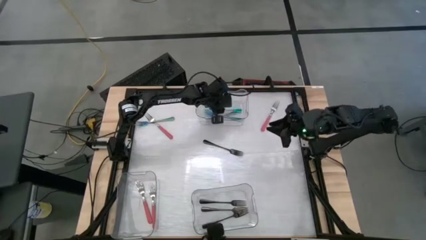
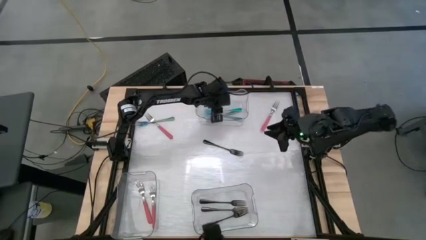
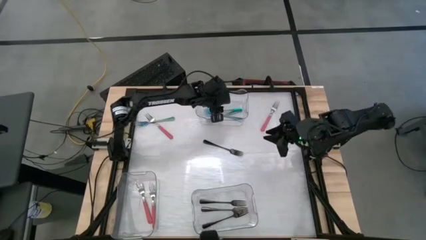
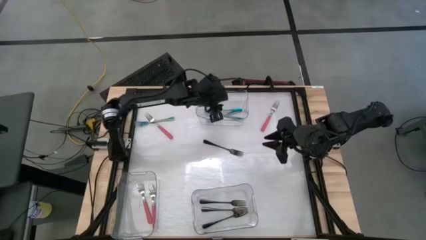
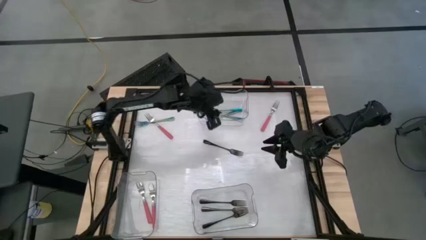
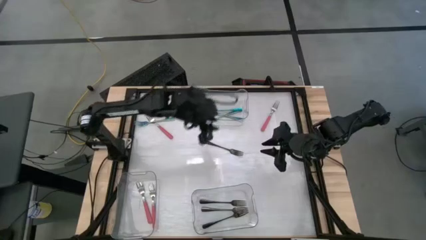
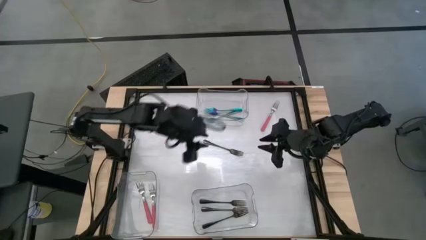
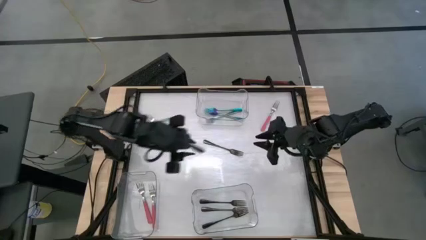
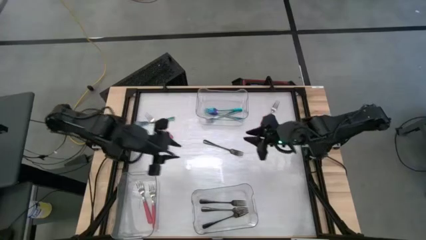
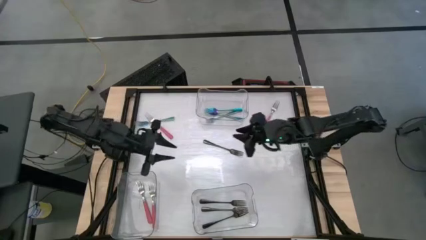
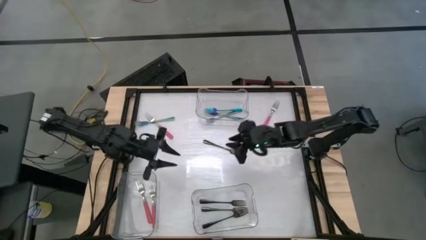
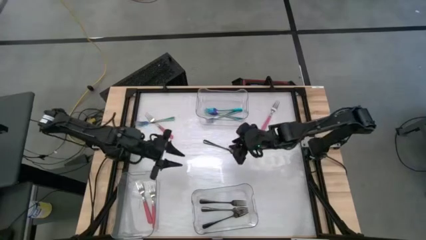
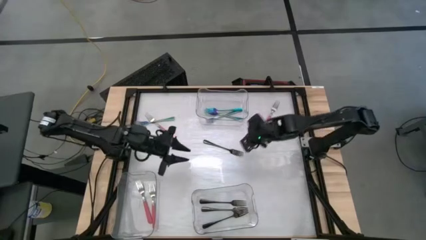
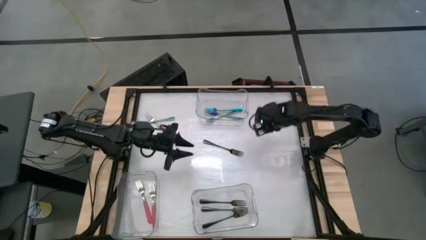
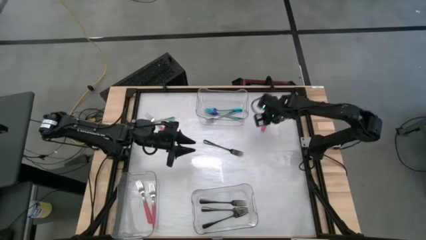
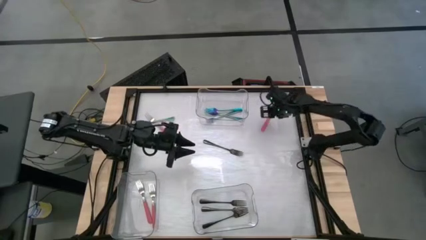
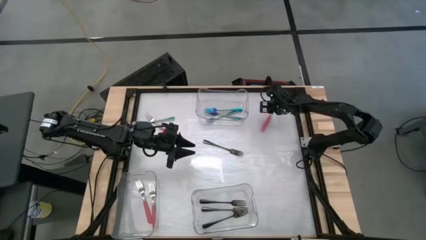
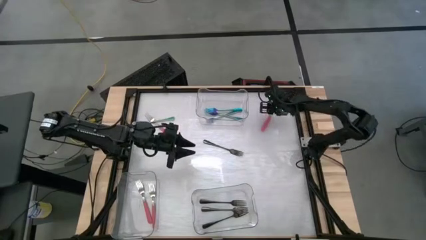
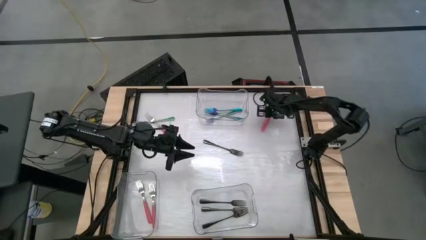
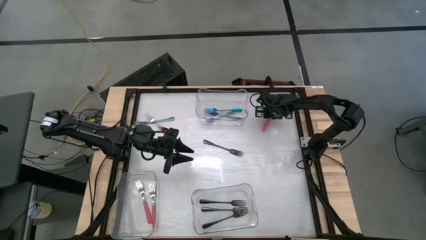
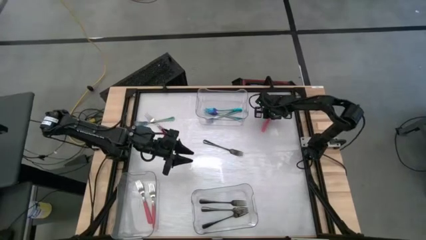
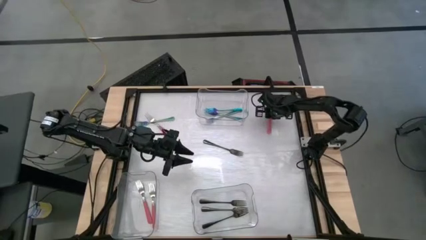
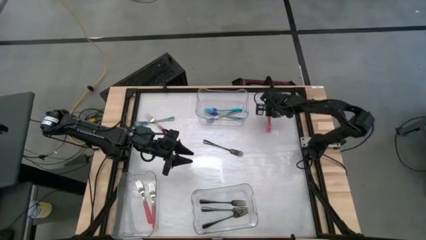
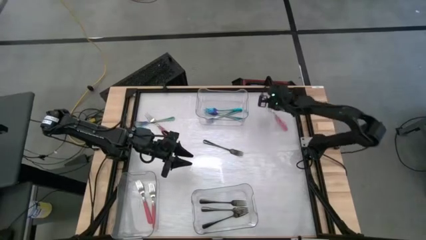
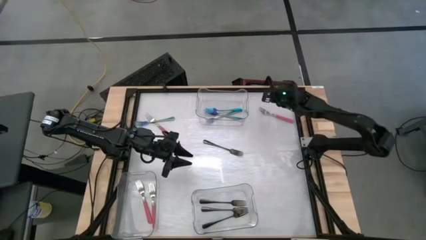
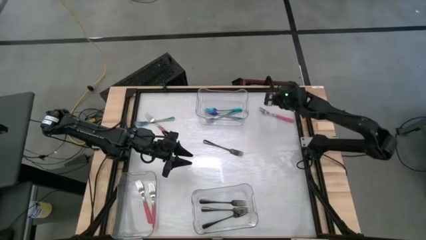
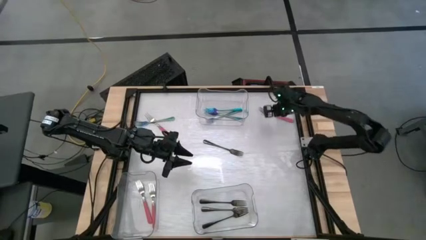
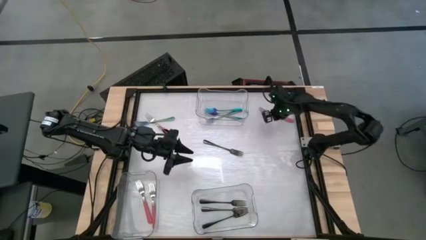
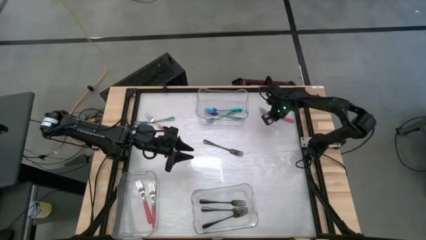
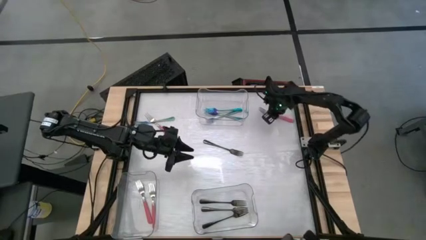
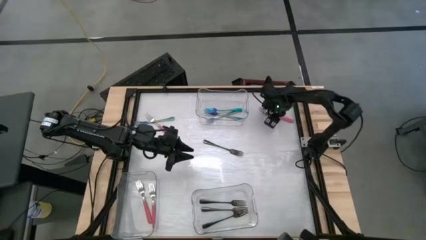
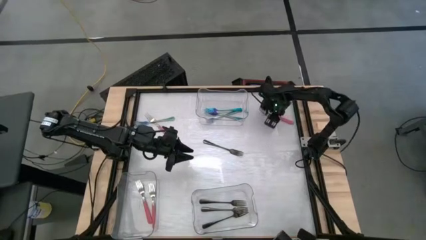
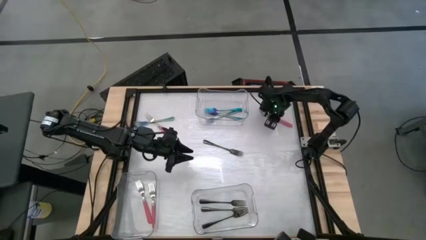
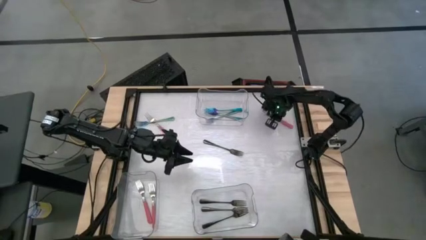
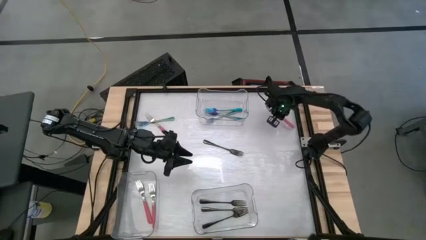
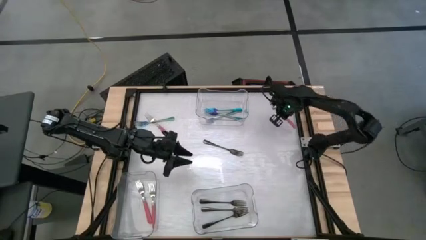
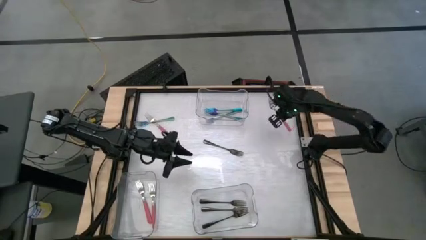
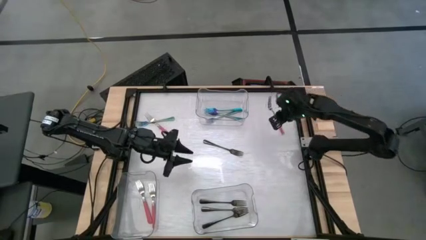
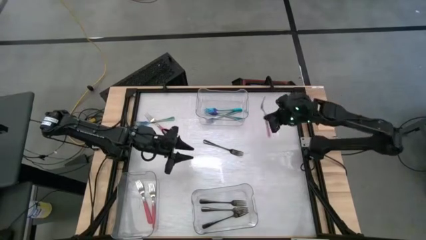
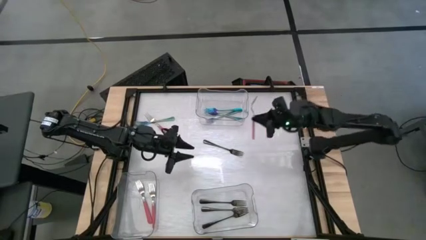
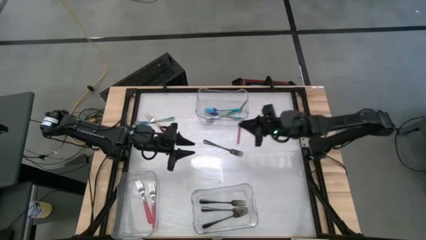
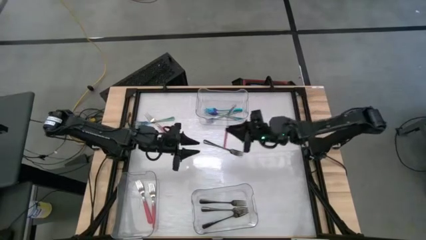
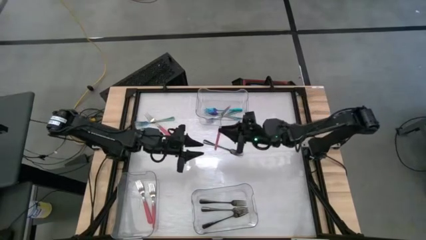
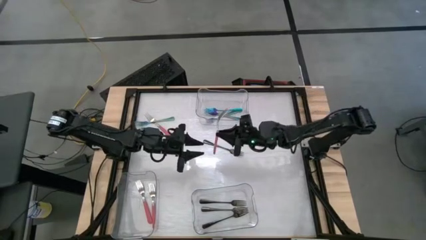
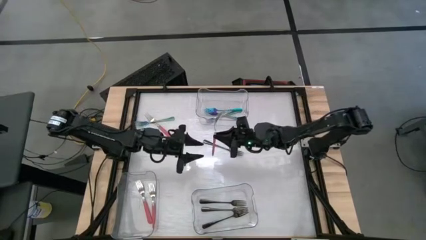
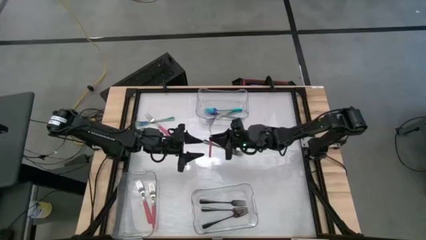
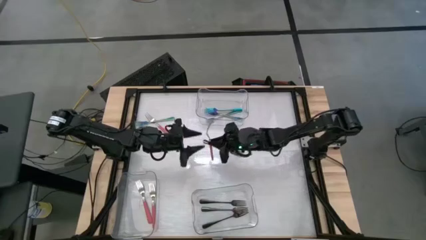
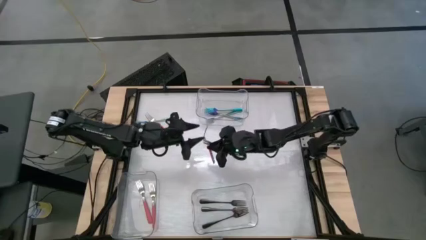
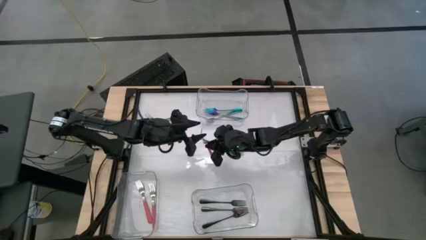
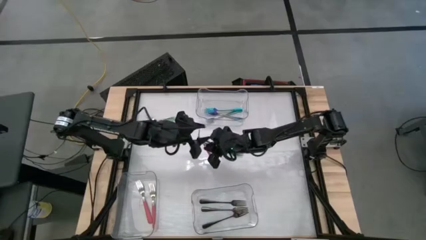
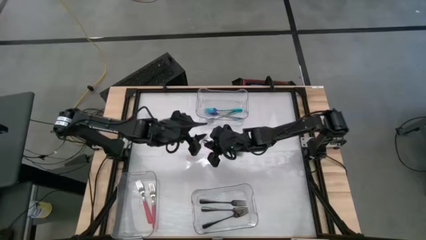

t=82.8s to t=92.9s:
Task: Sort silverware by color (type)
Put the pink fork into the bottom left transparent bin

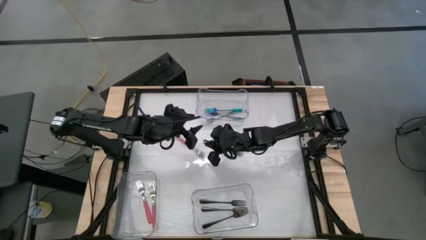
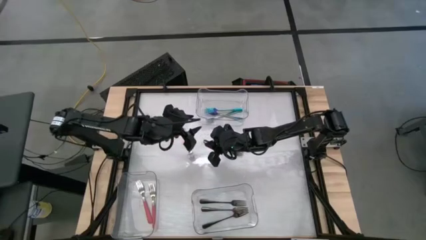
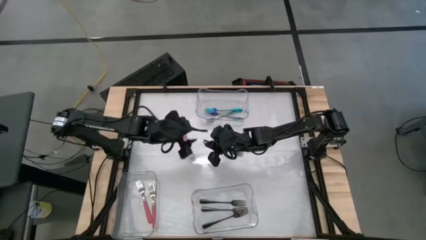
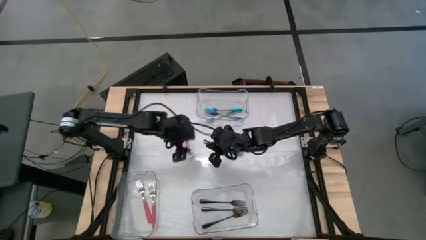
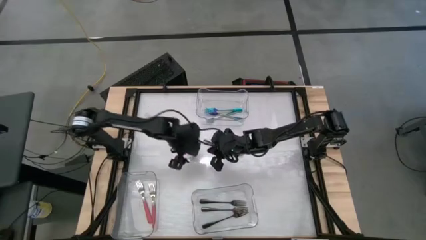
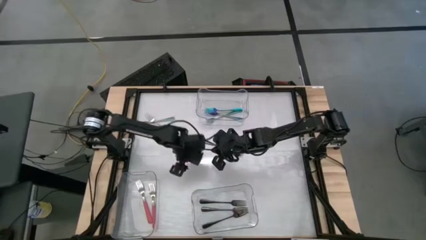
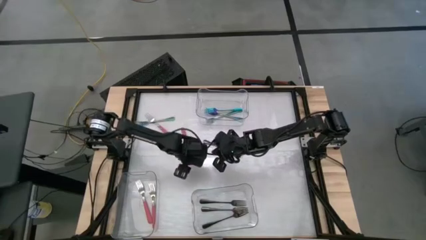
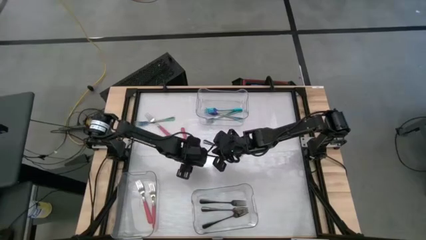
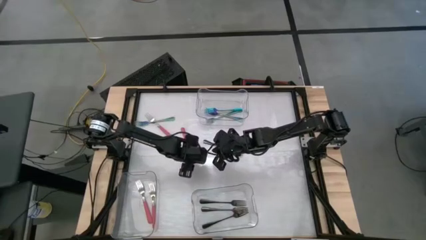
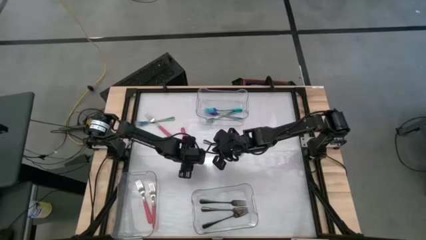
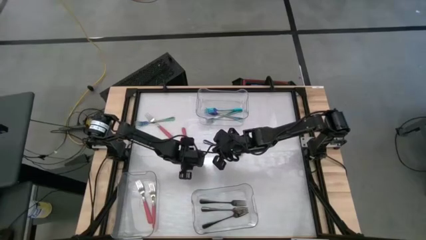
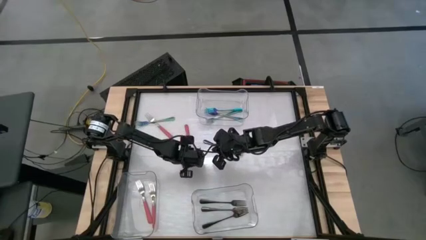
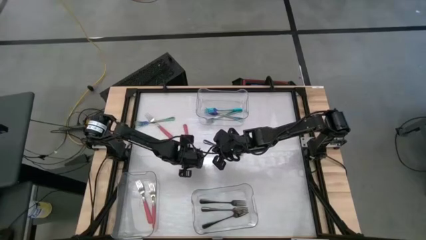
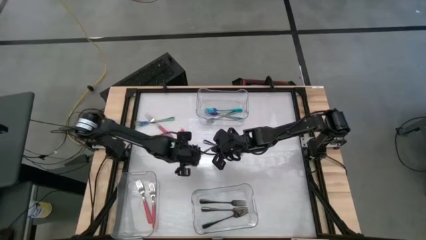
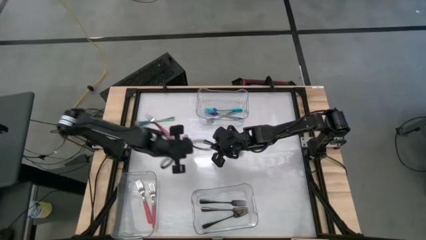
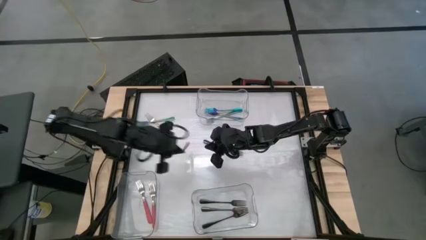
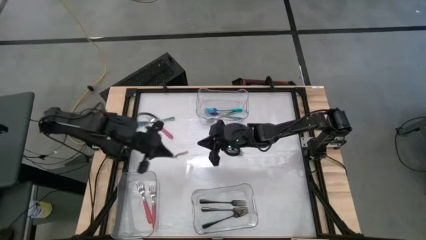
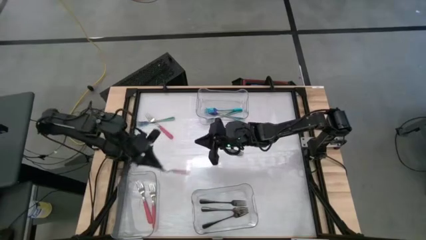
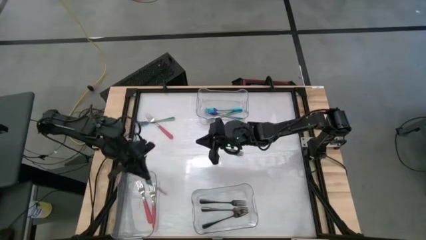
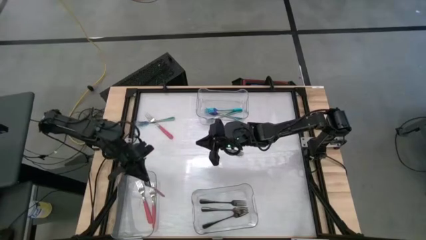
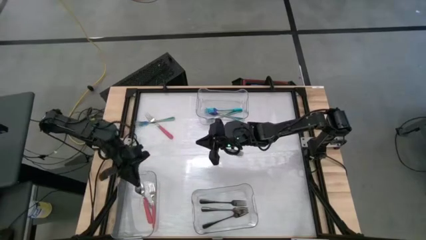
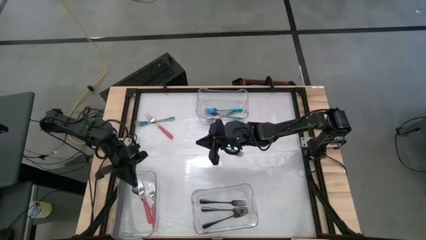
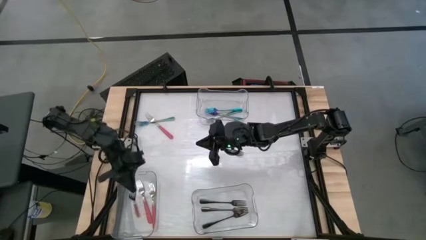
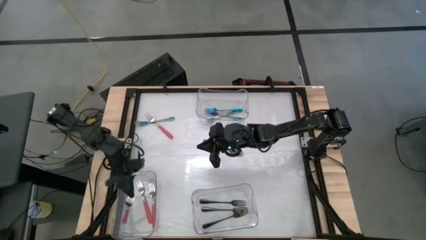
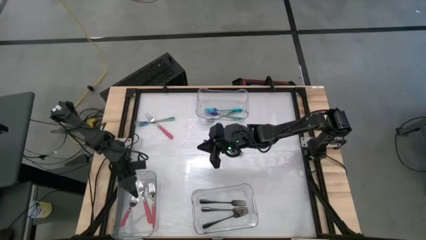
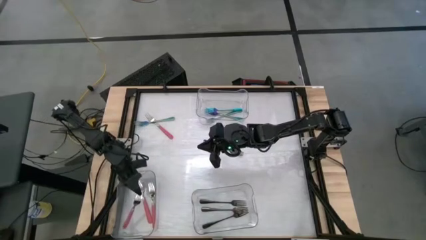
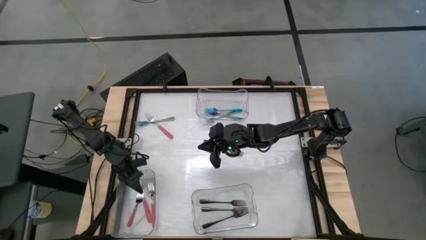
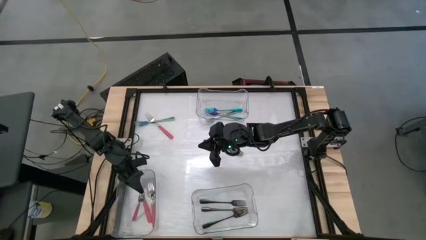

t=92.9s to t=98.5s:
Put the pink fork into the bottom left transparent bin

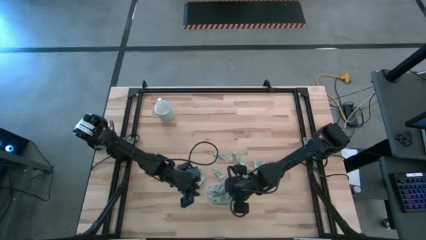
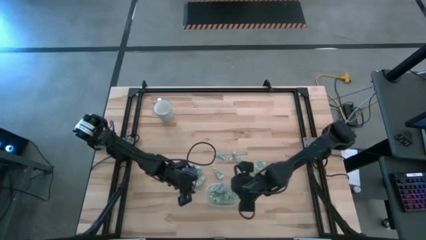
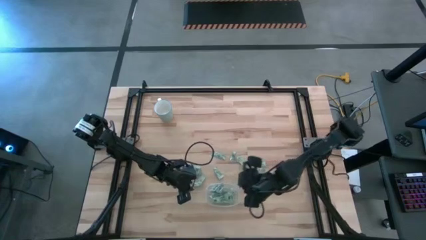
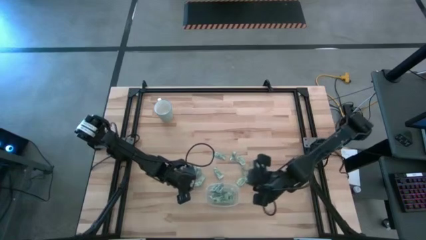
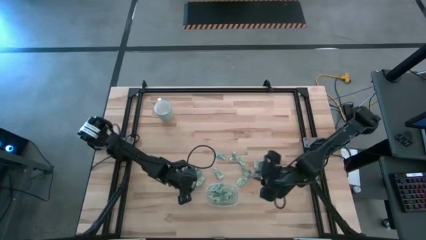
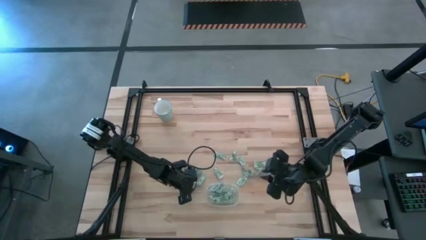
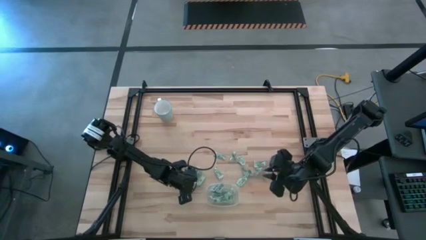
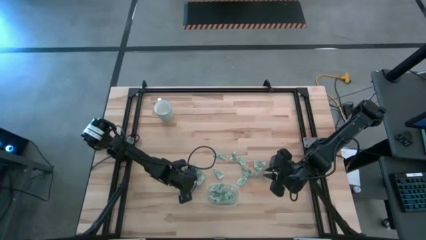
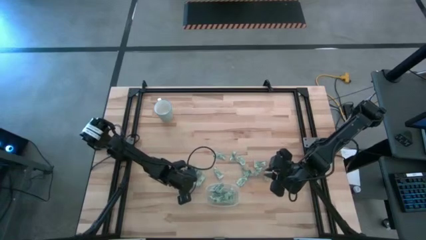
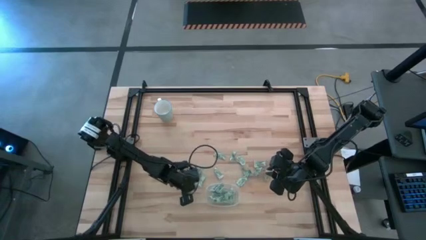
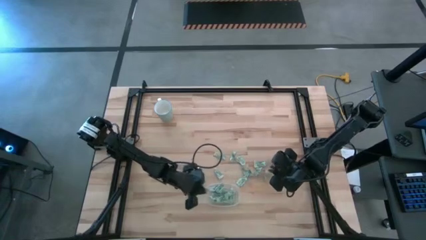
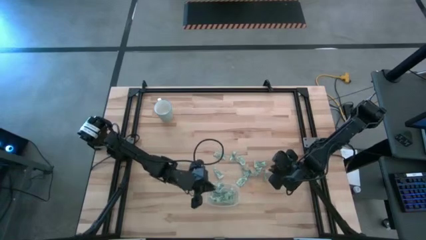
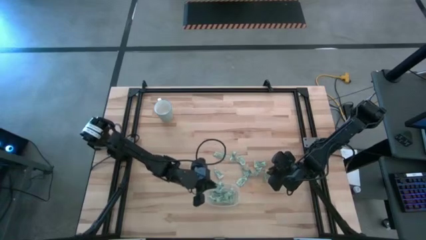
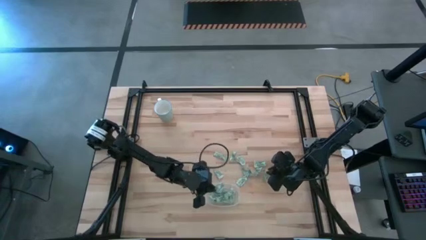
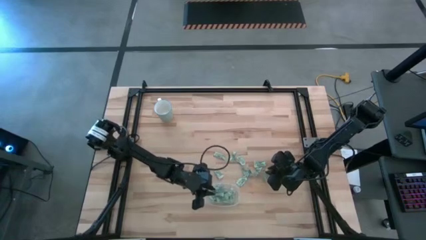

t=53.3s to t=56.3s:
Task: Pick and place Stevia / Truvia into bins
Put the stevia packet into the transparent container
